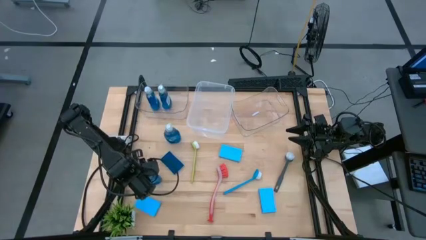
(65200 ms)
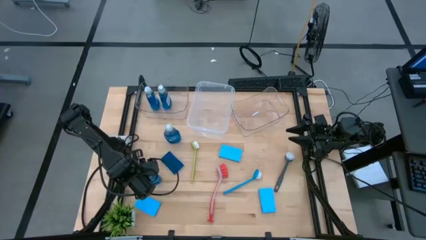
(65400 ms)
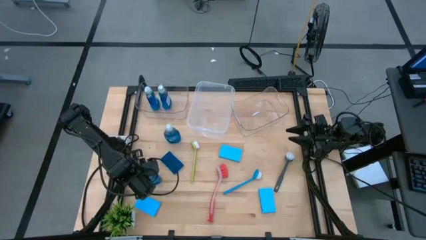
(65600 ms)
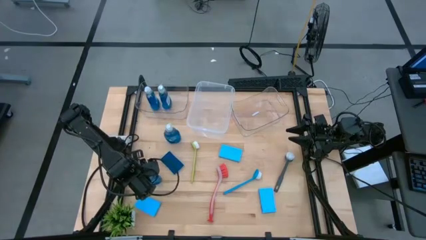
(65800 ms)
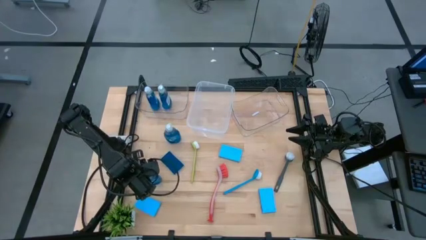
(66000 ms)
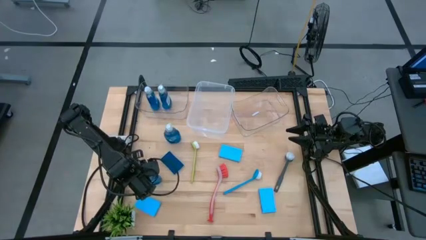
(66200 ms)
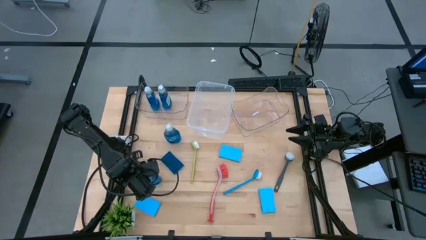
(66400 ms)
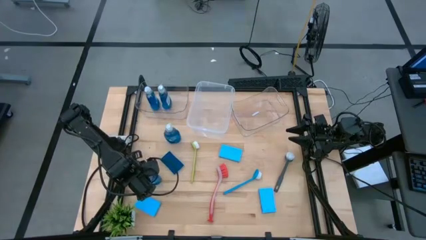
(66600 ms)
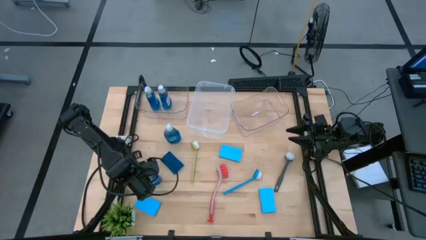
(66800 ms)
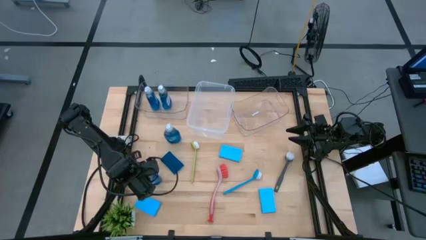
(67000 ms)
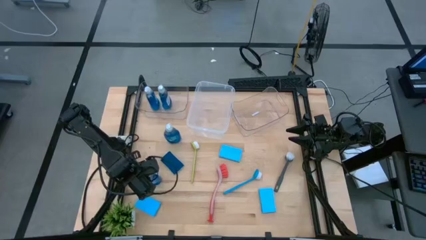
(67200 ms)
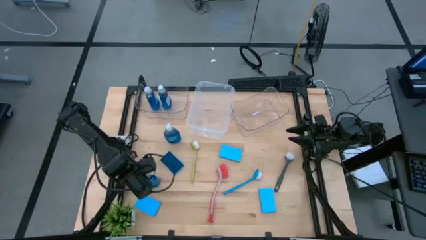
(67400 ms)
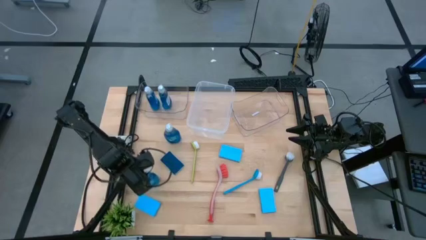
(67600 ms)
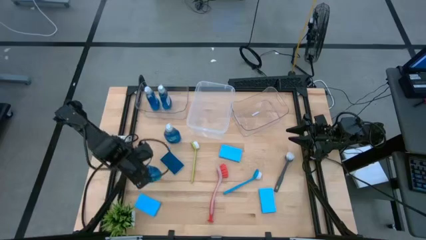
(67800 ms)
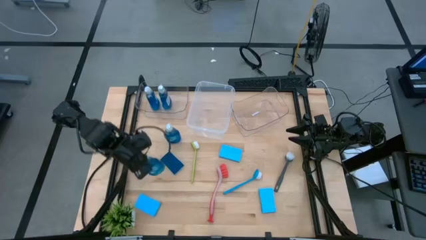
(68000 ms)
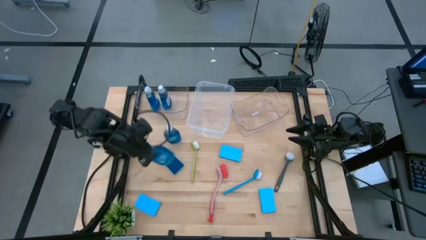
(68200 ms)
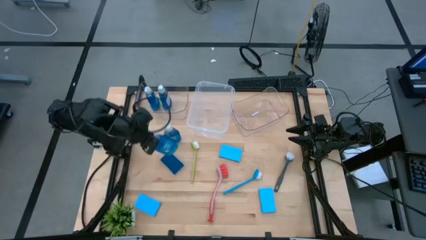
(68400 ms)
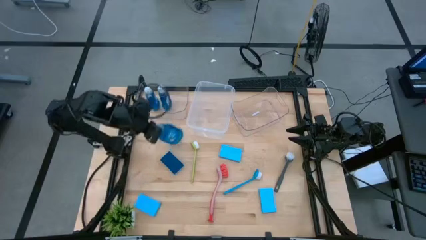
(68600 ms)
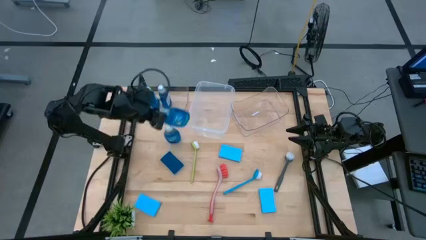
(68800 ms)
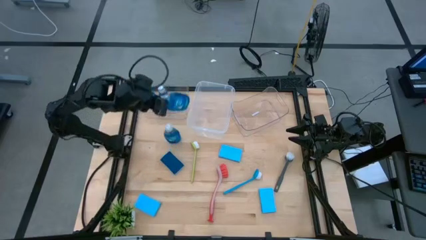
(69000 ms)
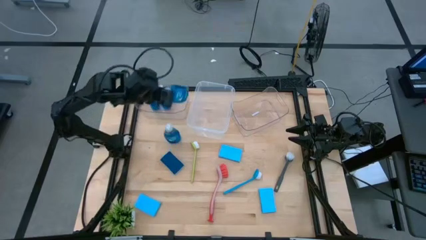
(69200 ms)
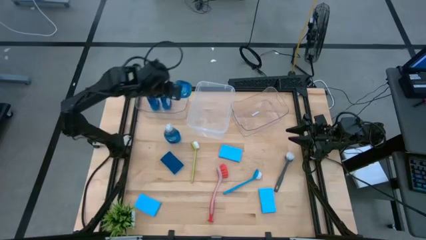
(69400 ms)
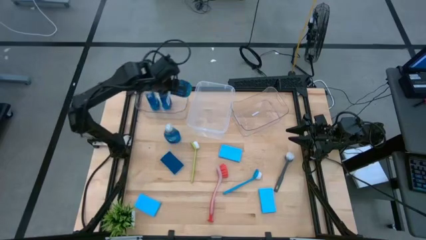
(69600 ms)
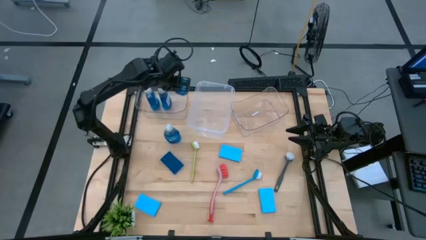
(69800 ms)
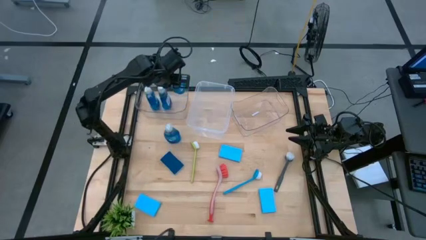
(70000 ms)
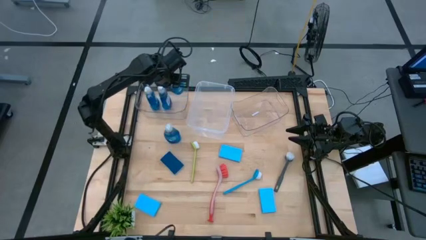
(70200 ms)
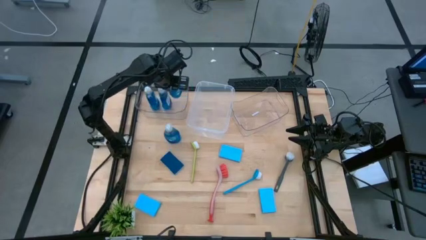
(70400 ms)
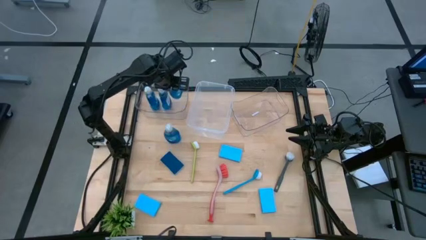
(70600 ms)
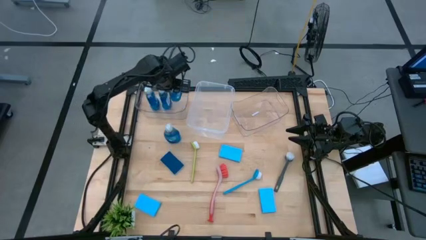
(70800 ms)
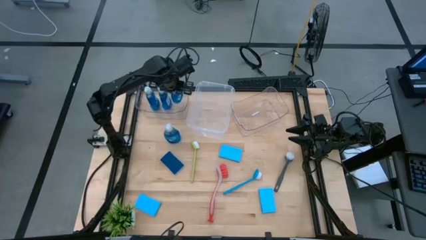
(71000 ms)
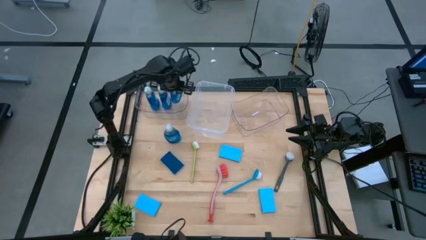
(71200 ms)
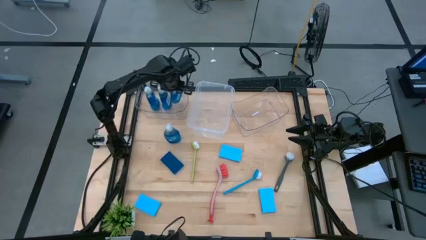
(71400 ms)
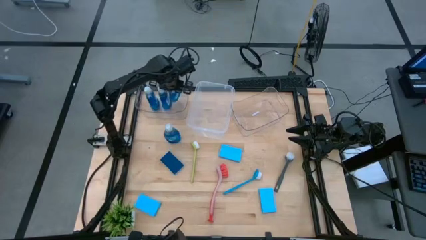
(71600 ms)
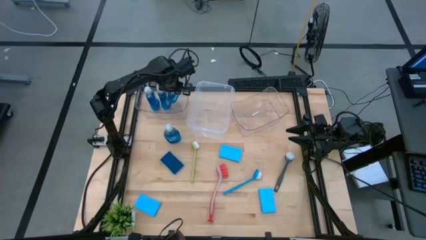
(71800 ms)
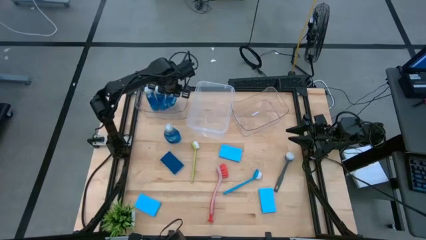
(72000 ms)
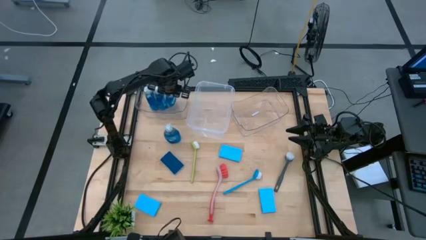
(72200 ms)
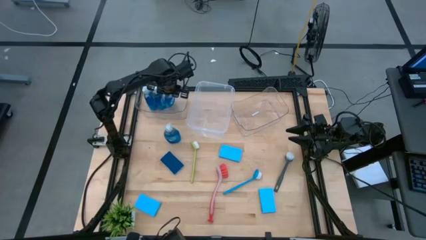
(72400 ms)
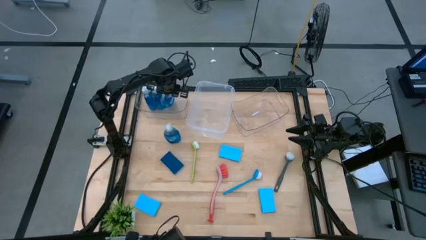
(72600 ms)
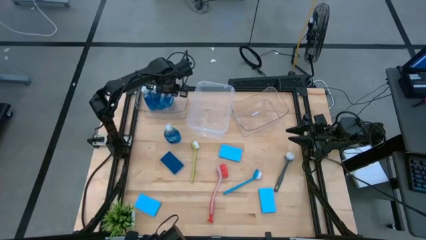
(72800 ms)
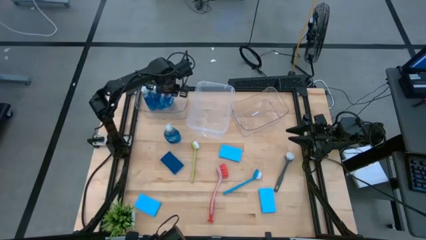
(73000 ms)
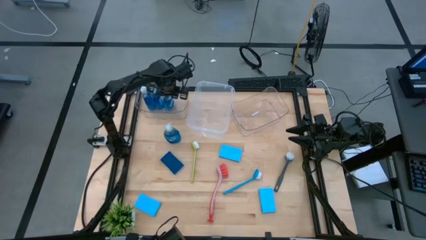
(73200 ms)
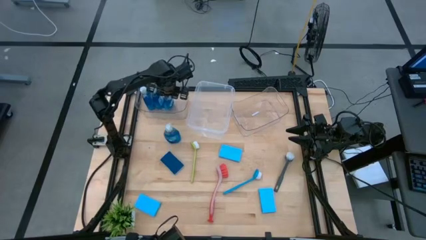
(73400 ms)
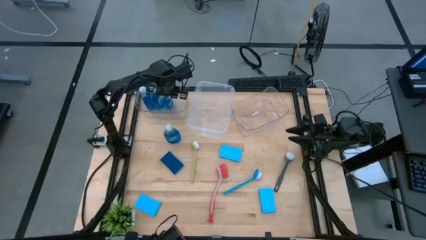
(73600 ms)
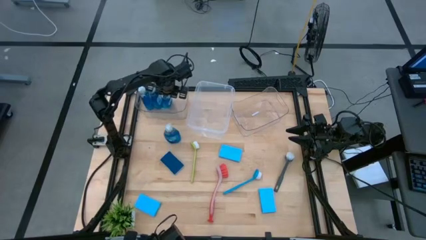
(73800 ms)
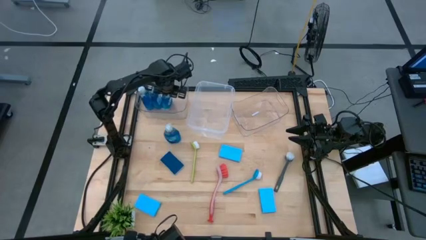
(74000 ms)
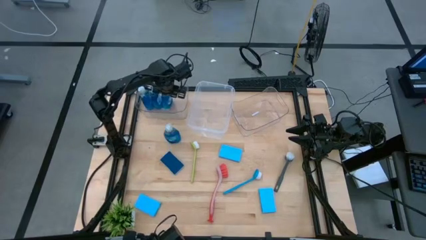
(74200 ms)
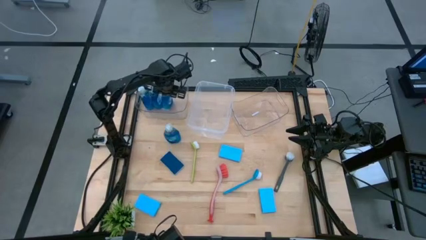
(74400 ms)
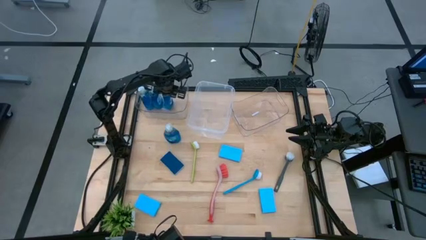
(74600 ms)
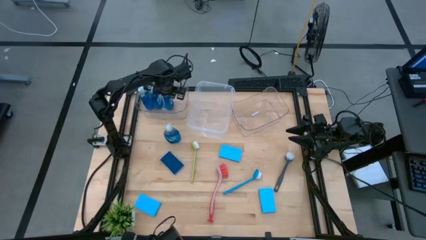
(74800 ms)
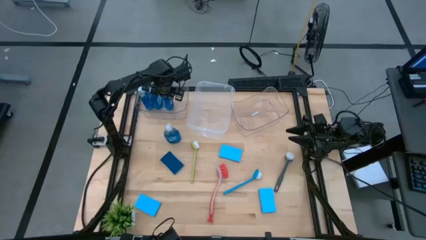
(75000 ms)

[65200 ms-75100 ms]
Task: Pick & Place Kitchen Sink Supplies
Put the dish soap into the left transparent bin

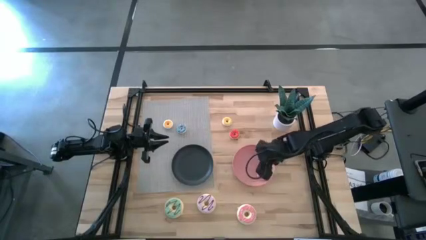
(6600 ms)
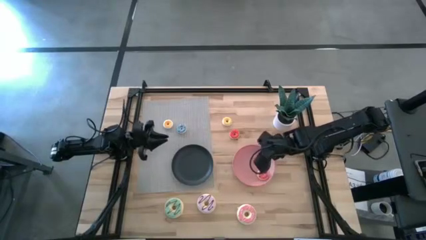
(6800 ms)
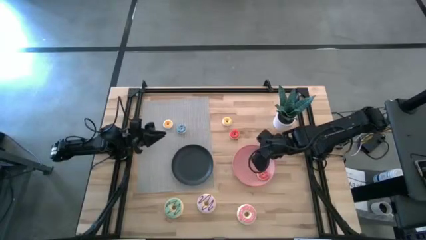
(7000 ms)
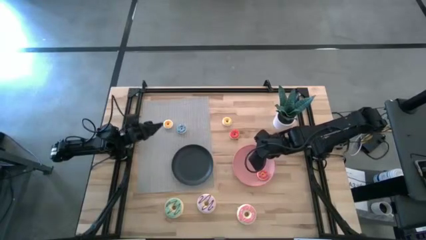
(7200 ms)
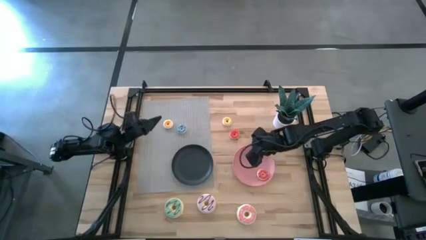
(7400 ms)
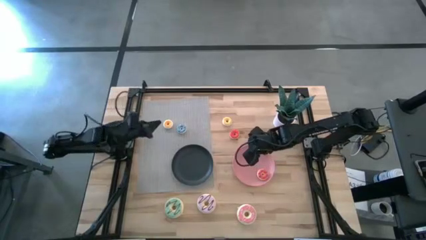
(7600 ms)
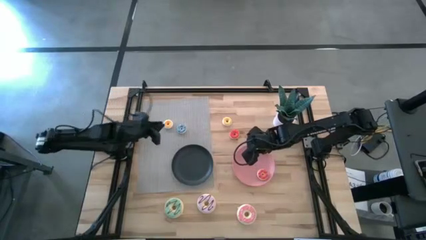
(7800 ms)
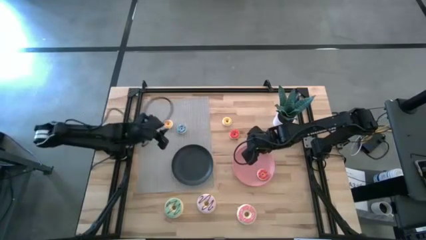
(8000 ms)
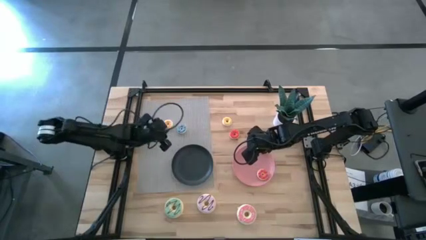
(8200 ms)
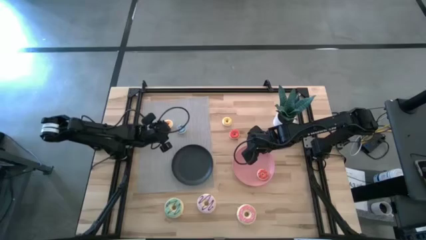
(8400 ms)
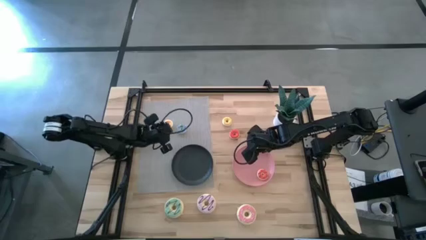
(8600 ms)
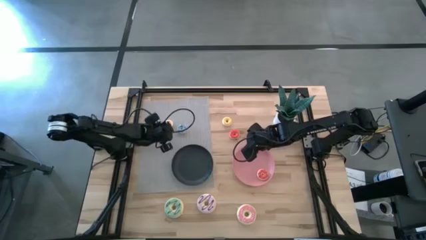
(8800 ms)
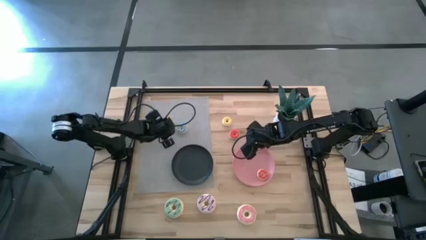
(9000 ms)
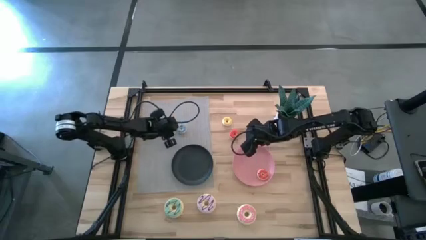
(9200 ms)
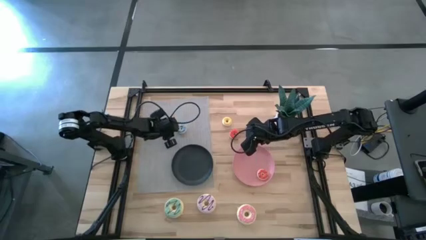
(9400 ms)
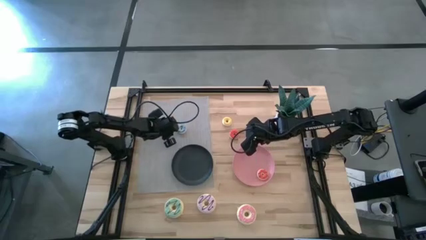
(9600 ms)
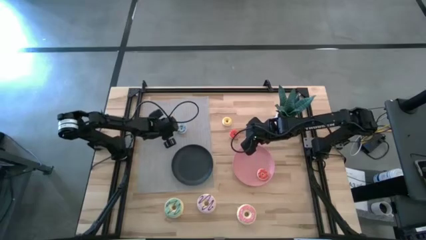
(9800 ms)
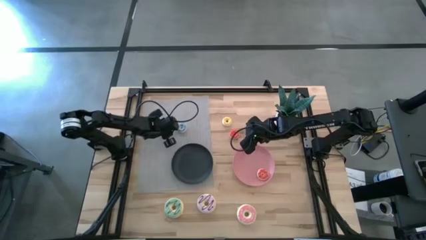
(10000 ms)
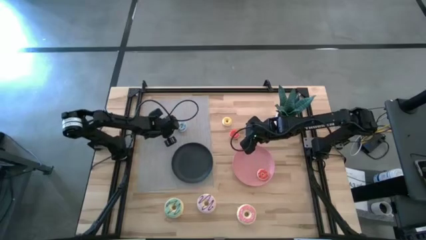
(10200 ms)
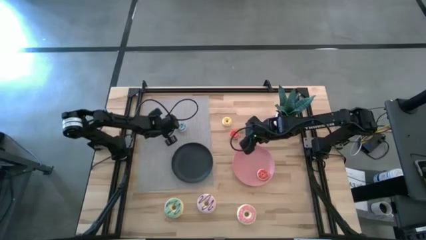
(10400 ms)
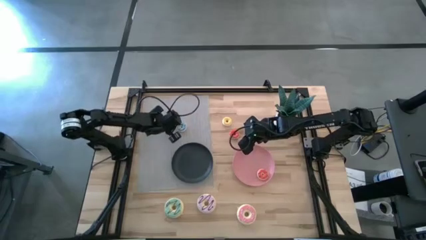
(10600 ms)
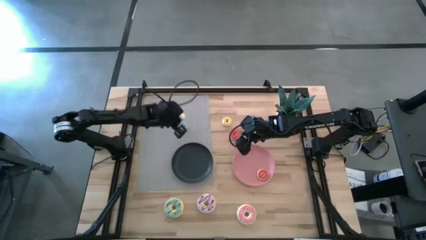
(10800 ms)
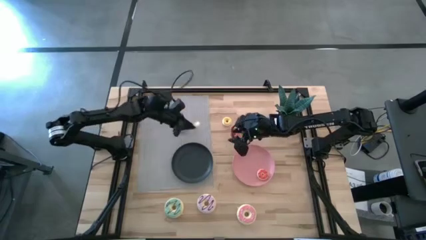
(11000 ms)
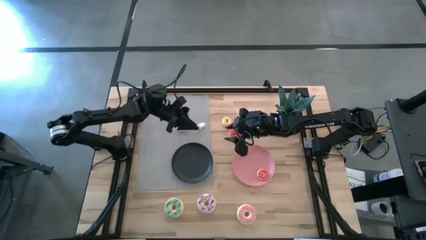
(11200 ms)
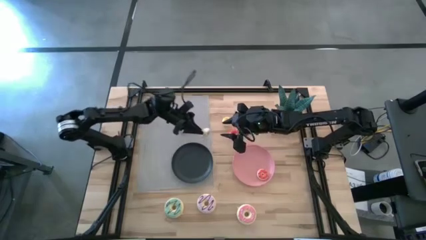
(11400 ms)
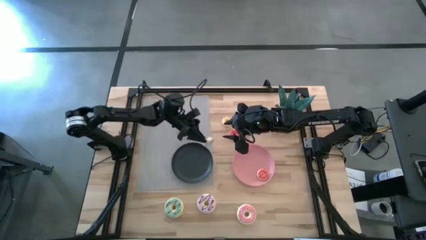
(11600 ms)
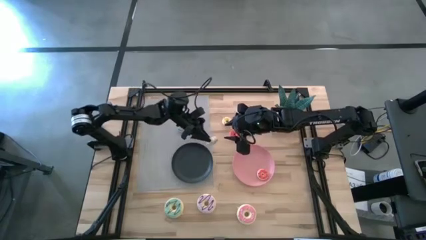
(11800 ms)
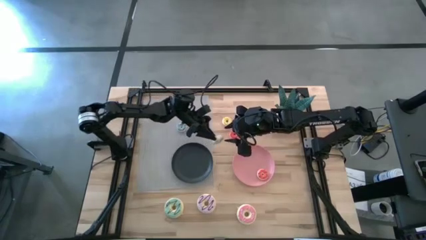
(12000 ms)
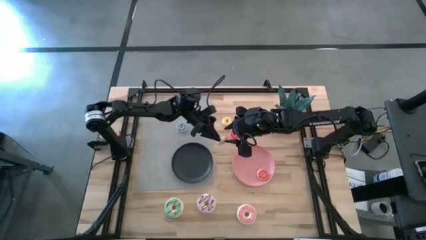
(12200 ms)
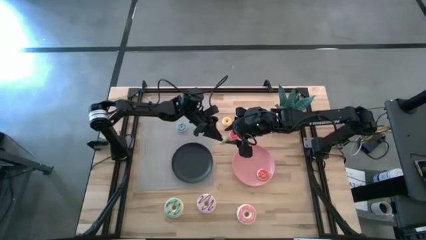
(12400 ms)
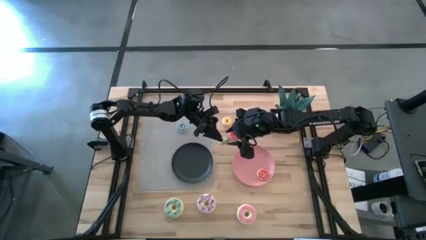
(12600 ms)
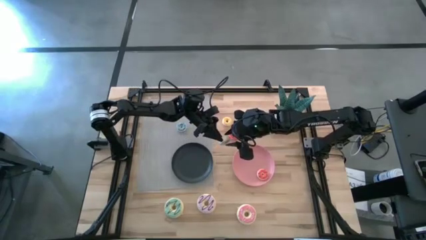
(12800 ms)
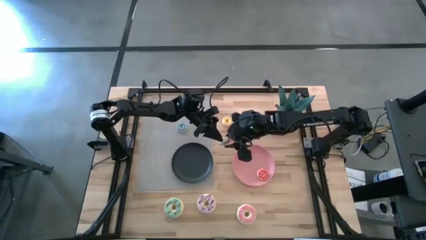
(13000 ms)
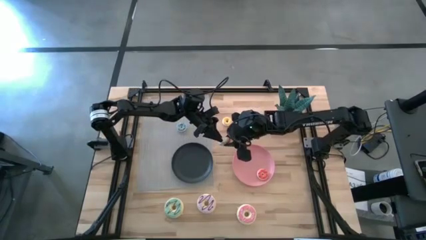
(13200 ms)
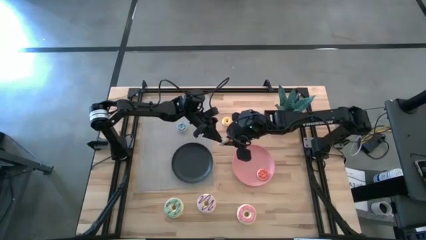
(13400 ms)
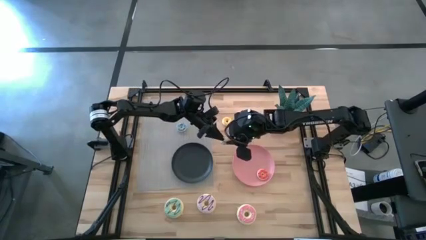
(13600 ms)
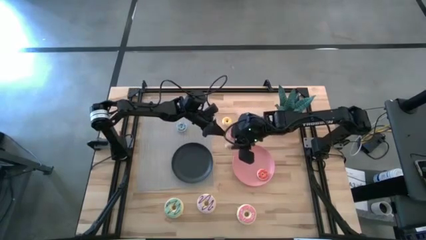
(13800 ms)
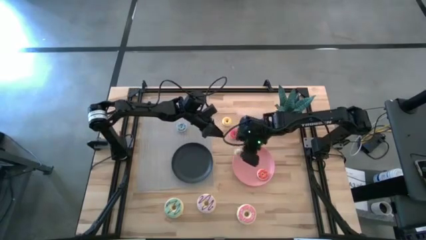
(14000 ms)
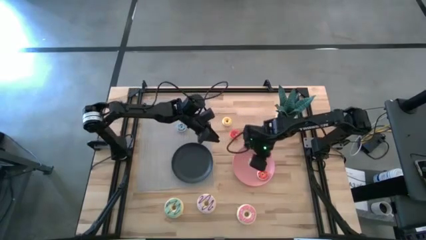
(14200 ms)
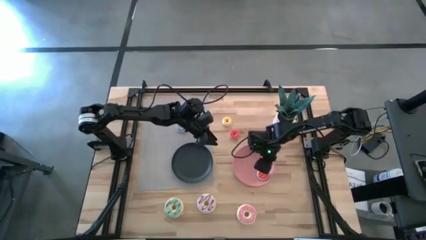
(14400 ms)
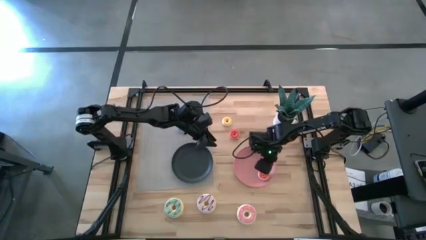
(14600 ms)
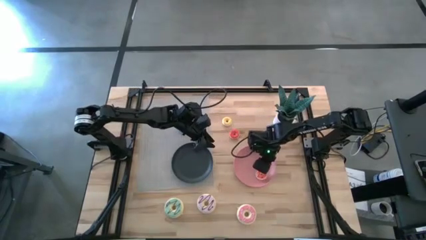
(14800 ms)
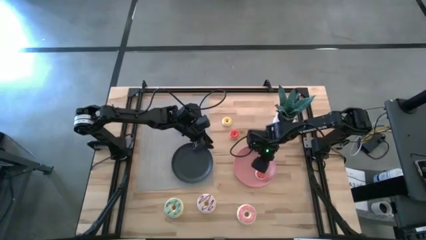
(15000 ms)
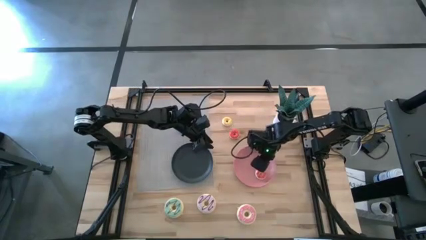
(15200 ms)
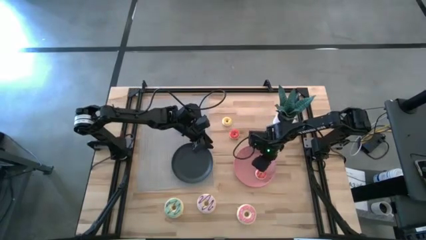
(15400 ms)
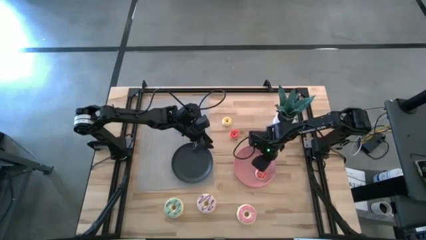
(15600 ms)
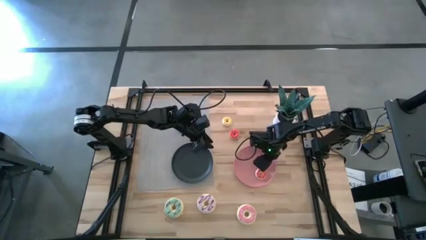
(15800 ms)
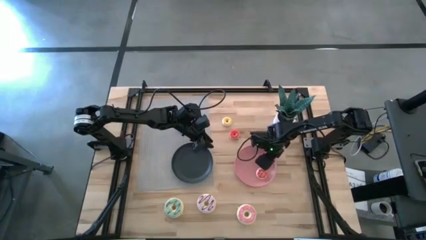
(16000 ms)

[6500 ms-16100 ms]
Task: Pick & Place donuts
Put the small white donut onto the pink plate
